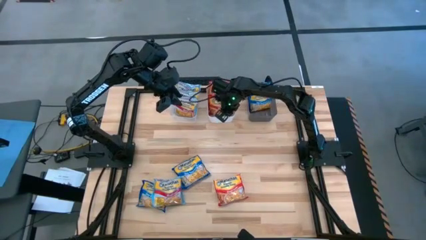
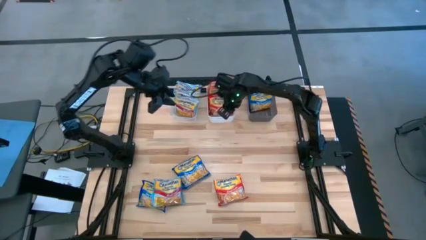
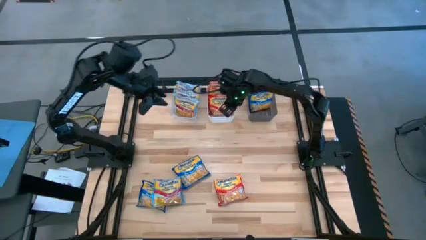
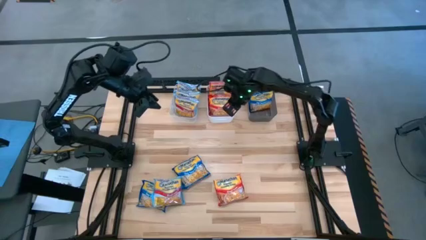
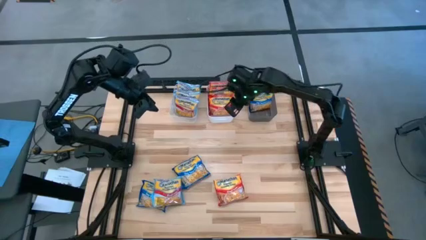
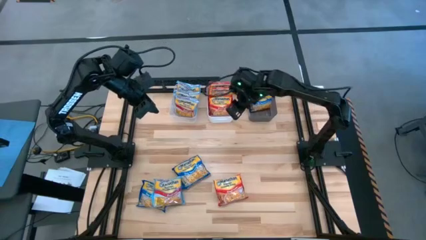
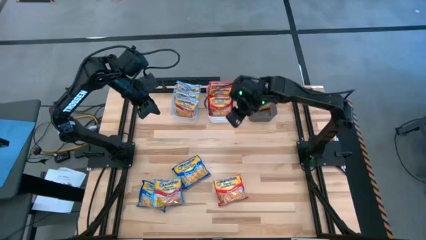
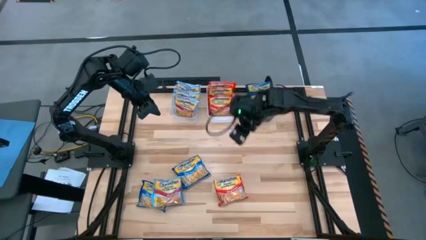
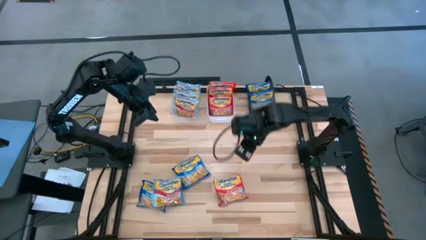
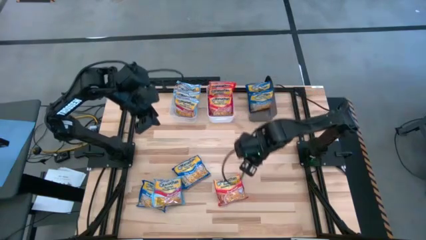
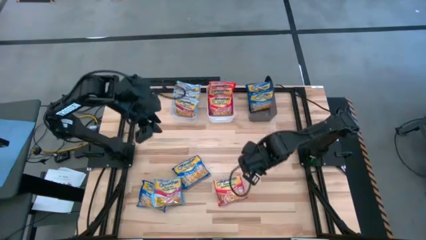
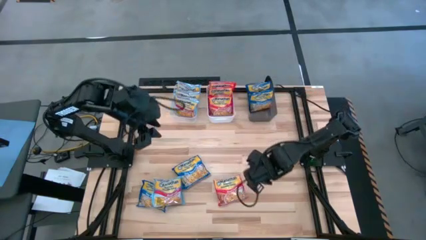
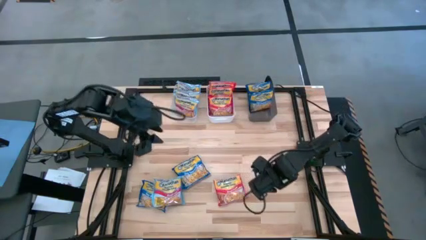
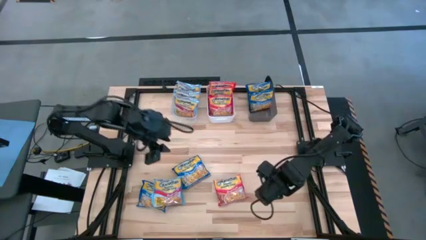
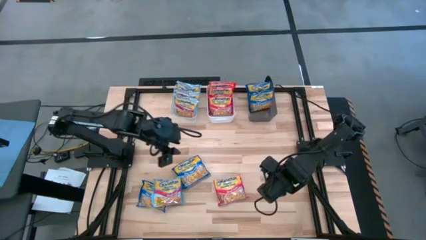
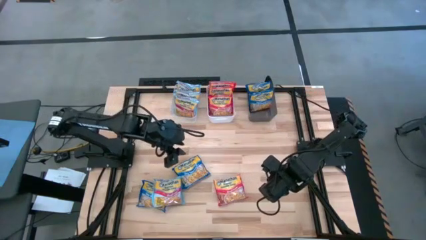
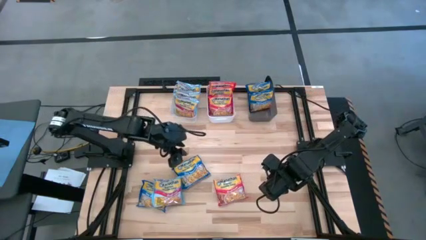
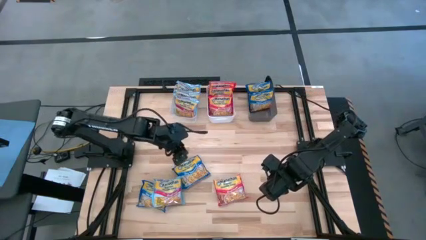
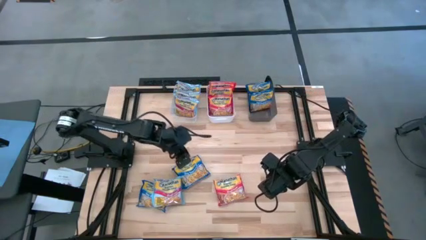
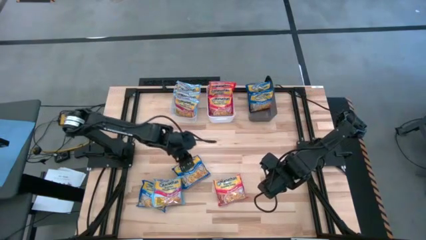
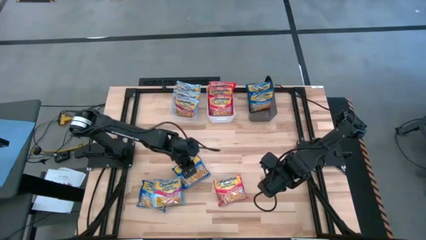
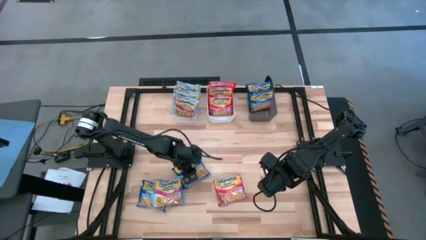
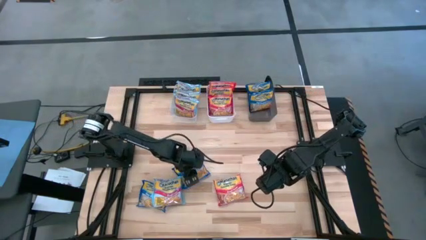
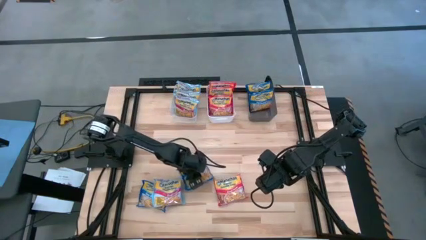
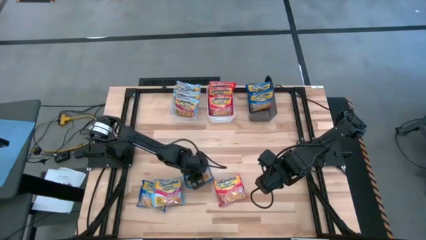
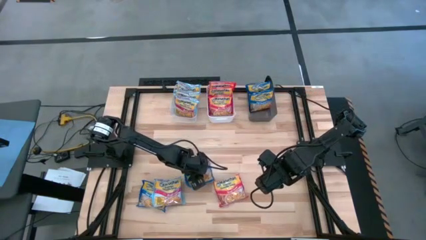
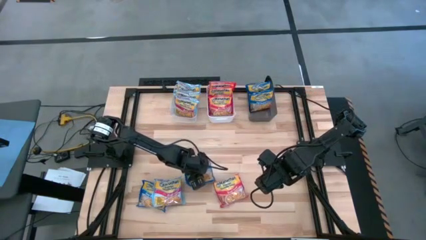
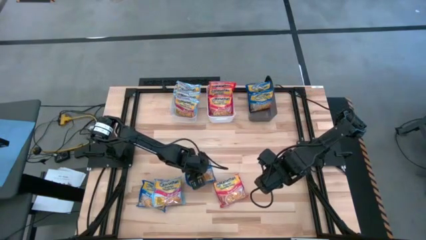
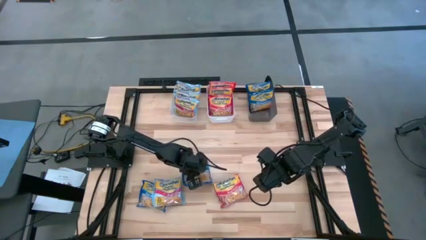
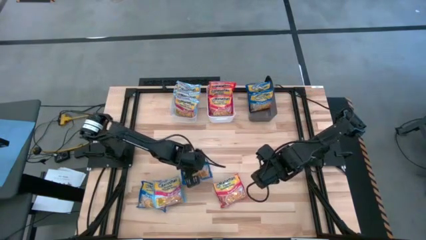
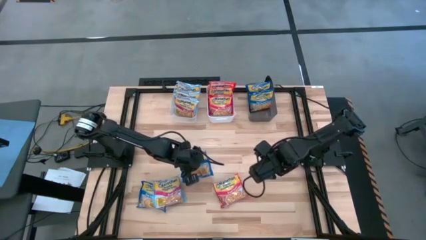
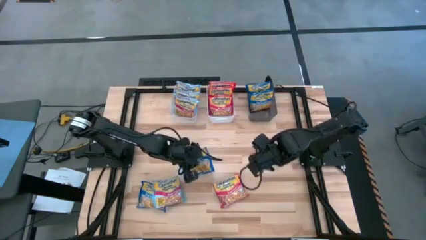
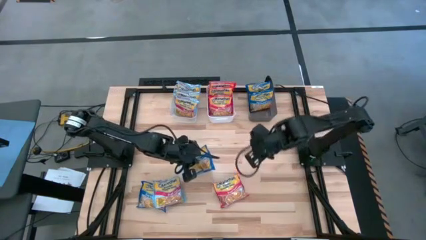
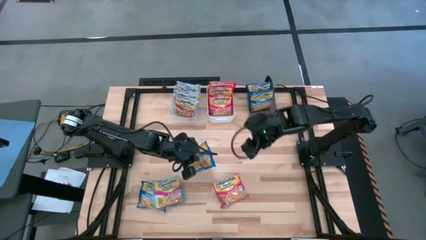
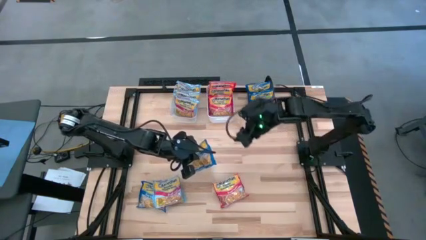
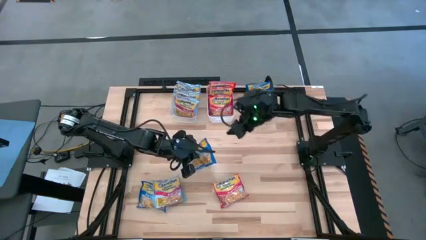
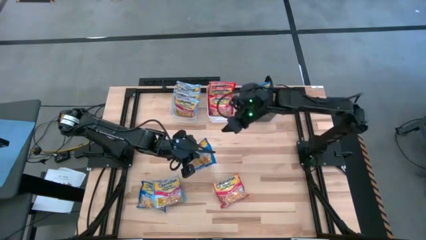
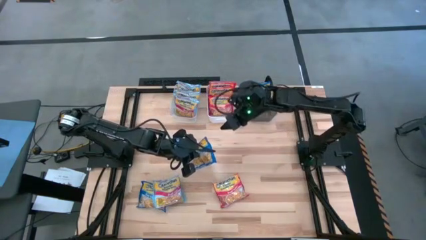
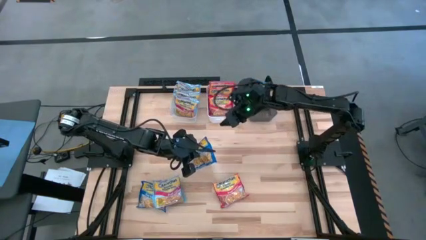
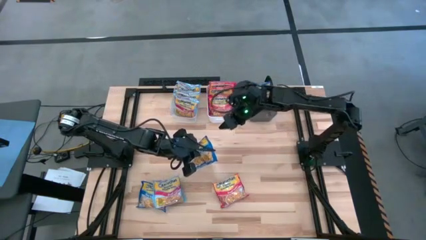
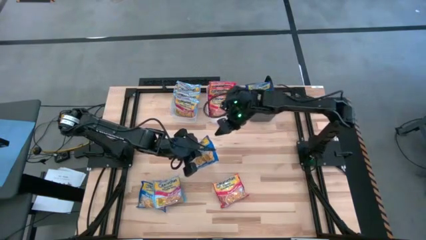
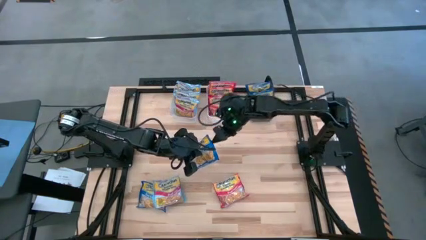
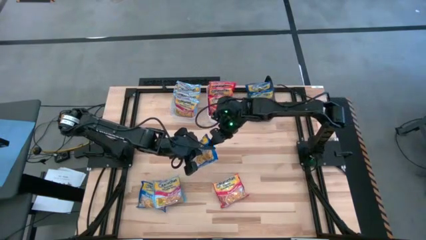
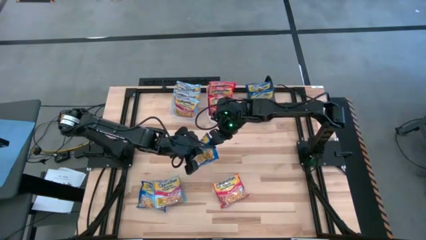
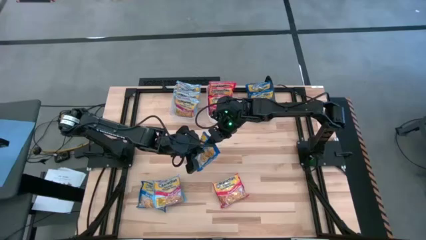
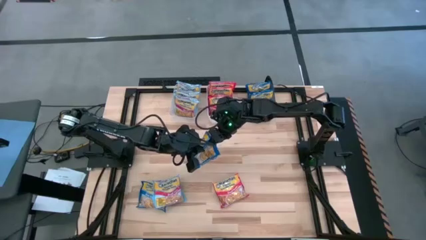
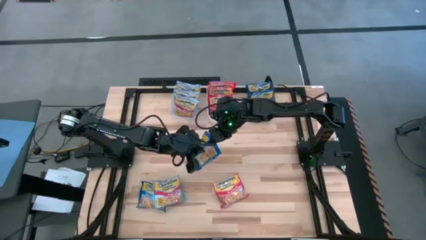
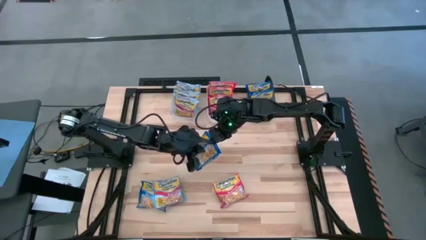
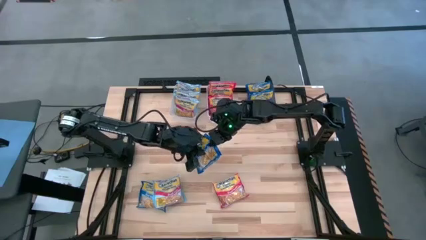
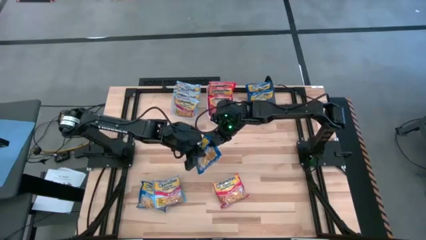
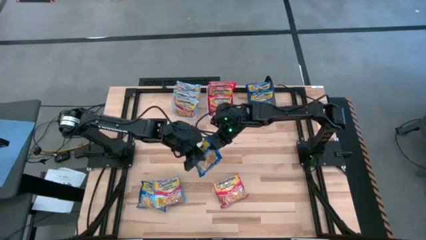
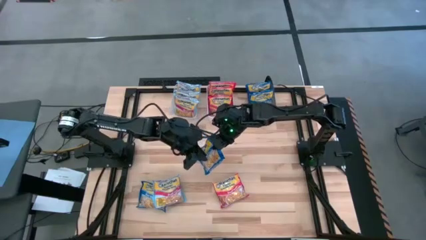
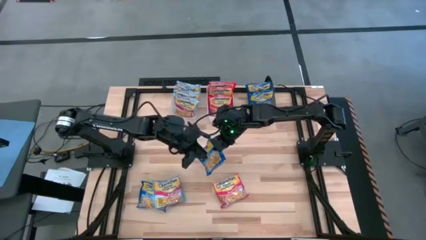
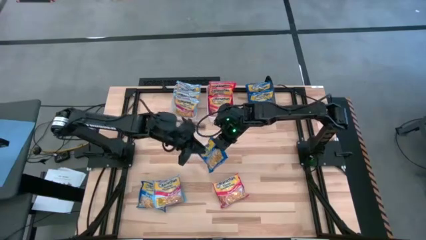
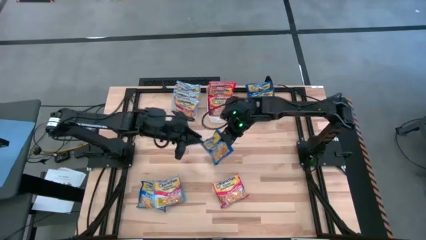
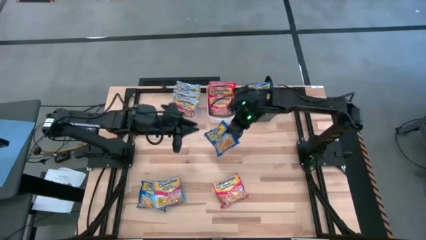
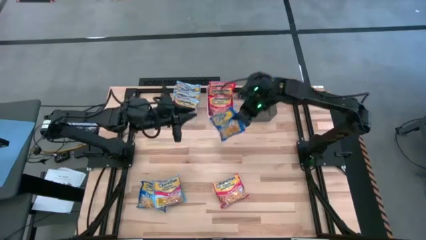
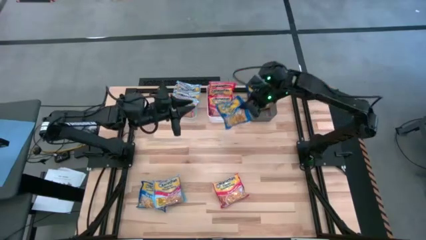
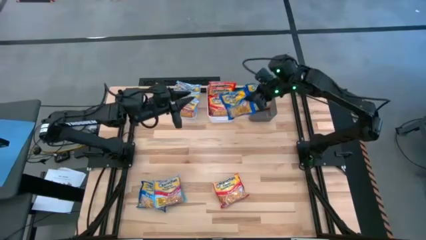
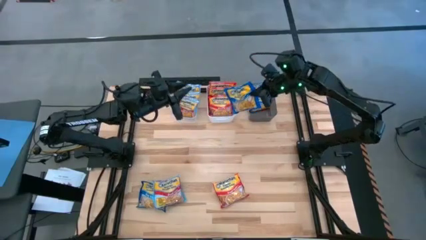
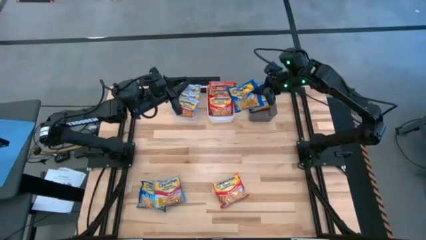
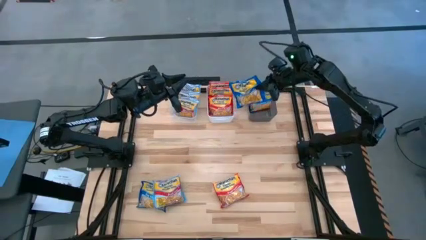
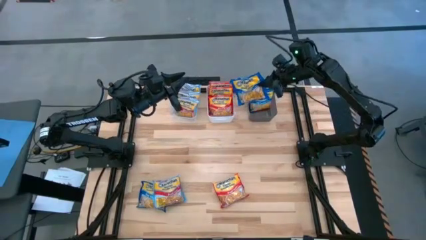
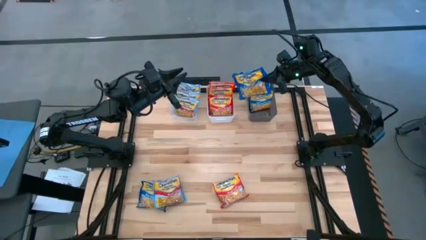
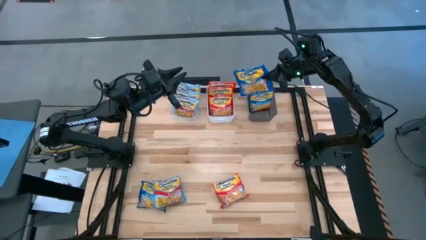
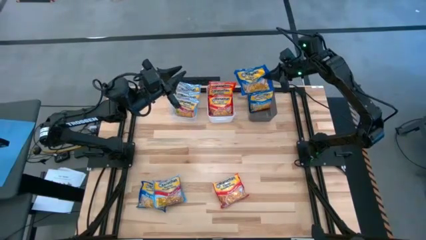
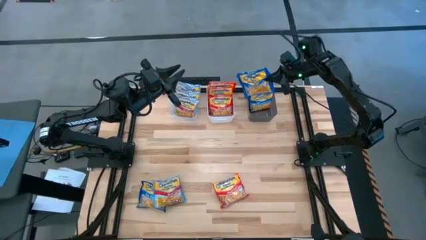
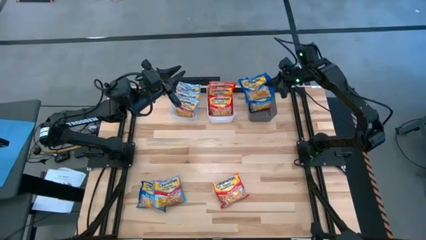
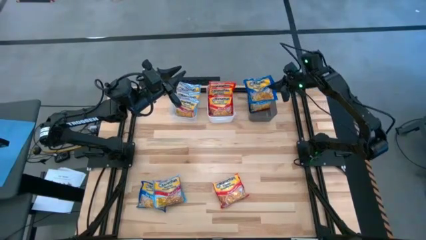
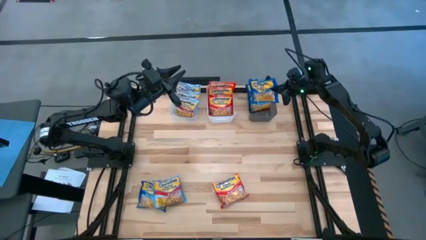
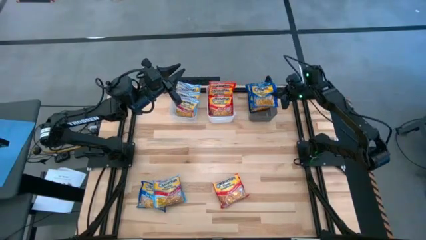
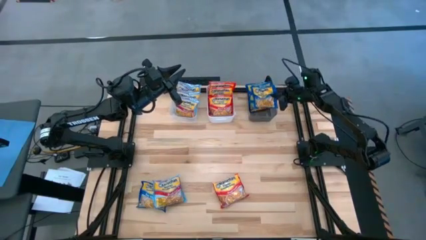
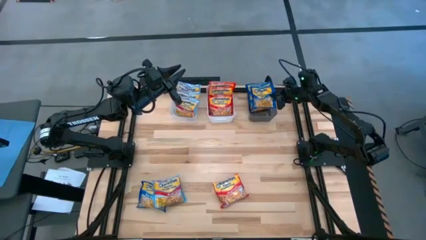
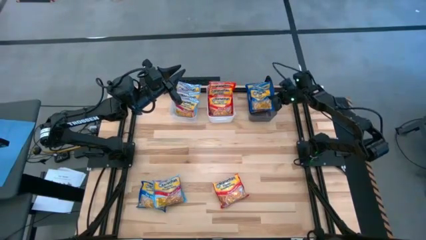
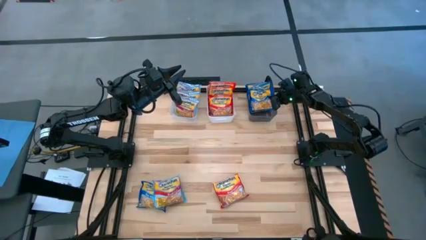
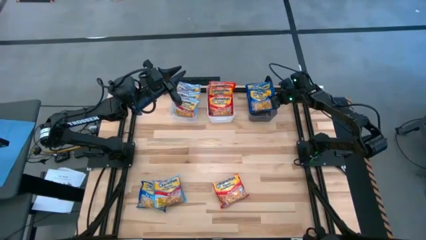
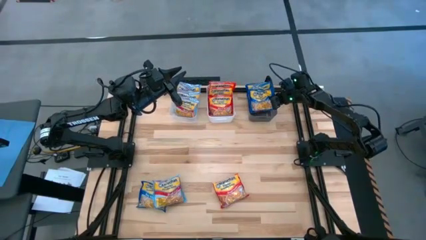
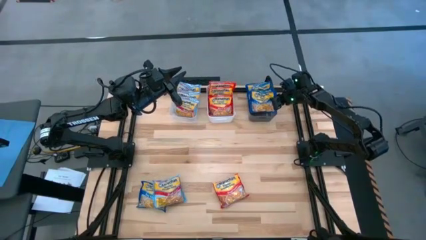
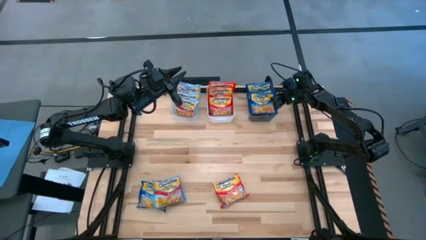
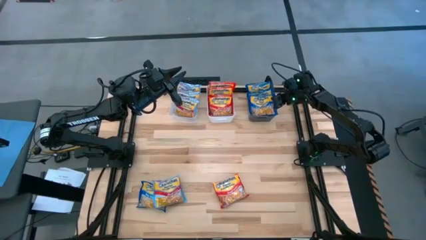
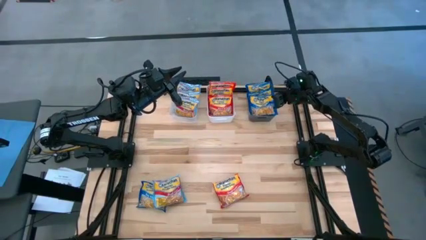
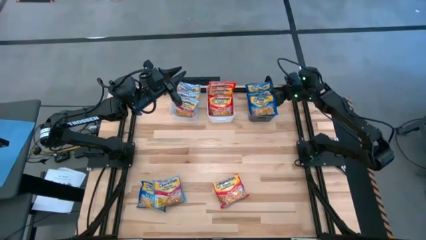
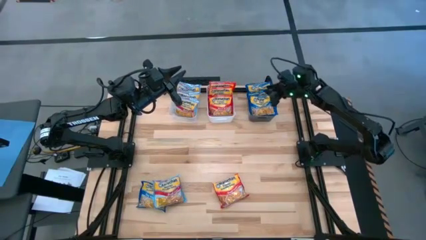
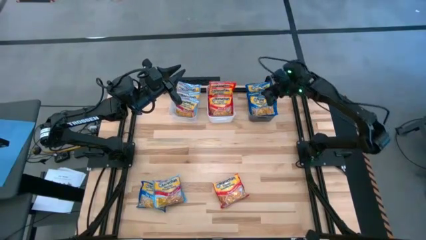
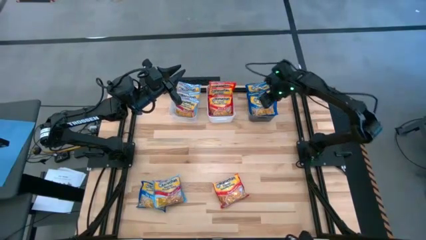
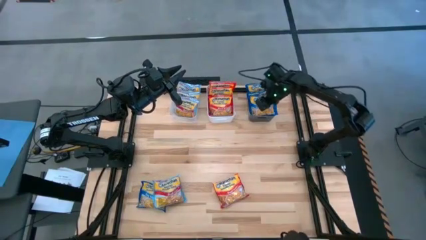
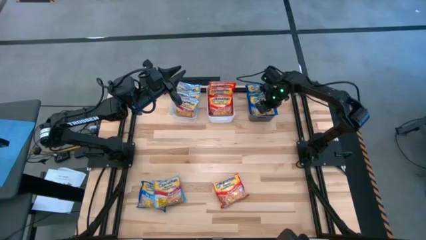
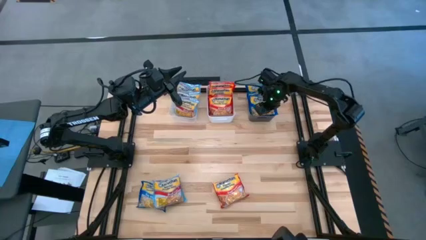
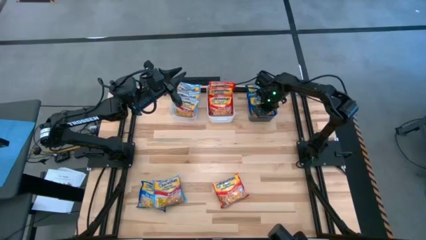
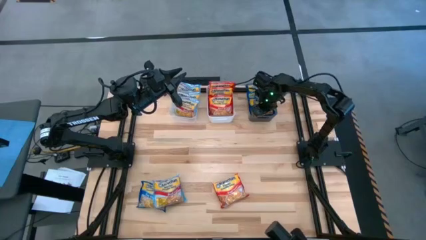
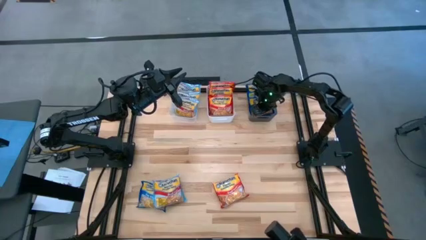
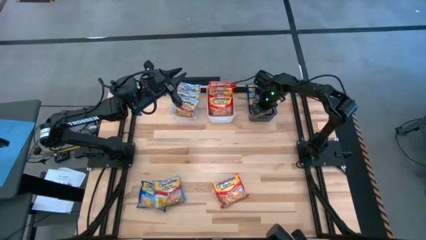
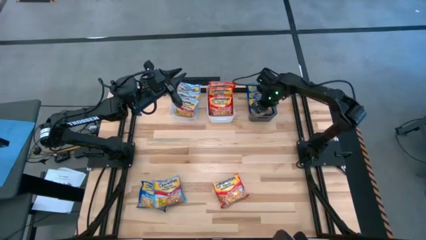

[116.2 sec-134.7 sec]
Task: Sort Maruchan noodles
Put the blue bag into the black bin
